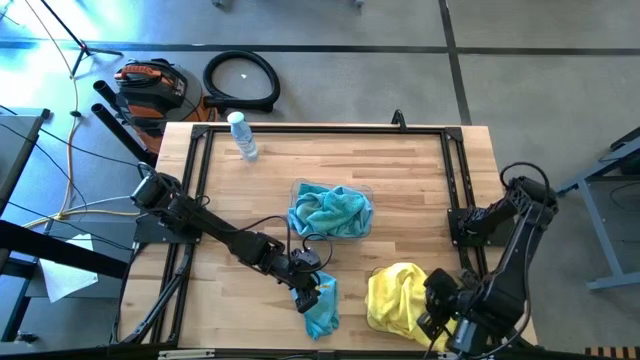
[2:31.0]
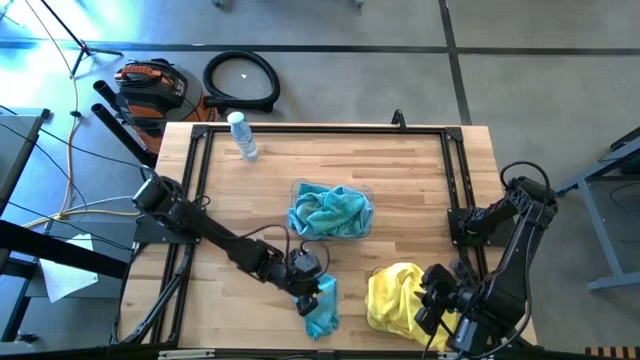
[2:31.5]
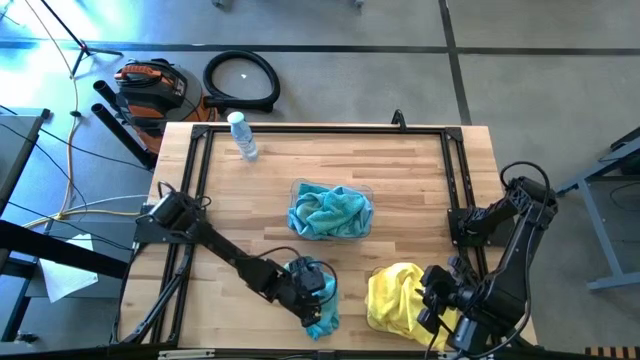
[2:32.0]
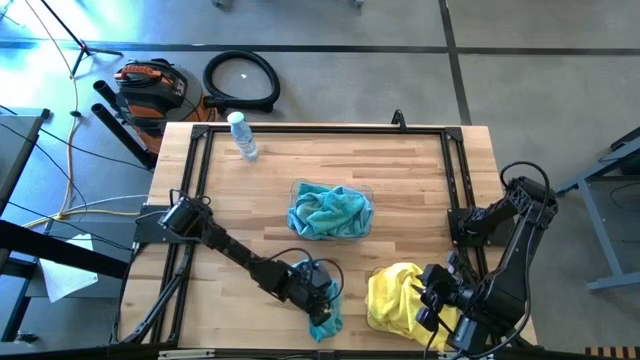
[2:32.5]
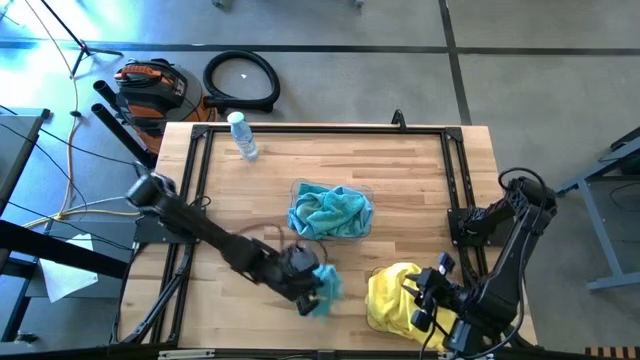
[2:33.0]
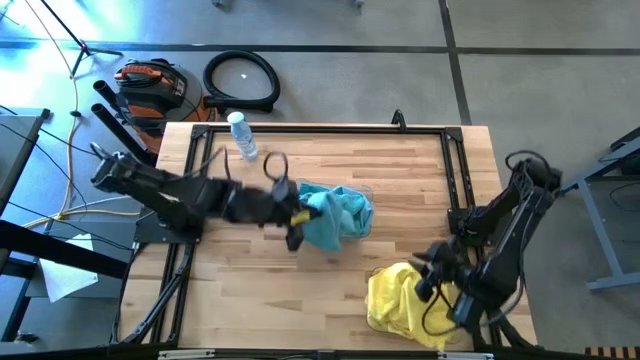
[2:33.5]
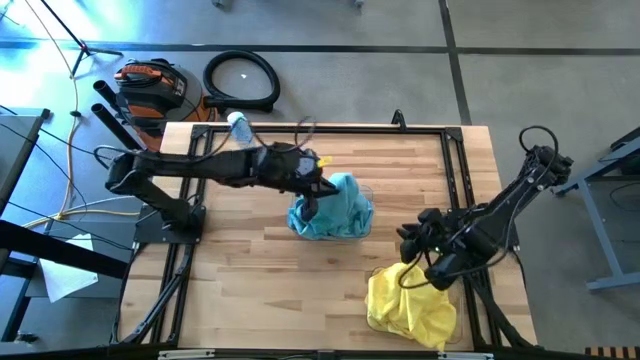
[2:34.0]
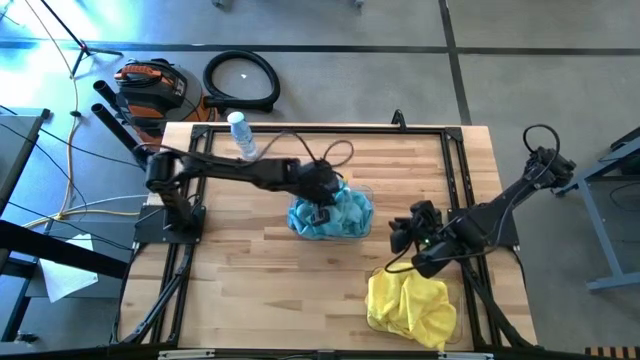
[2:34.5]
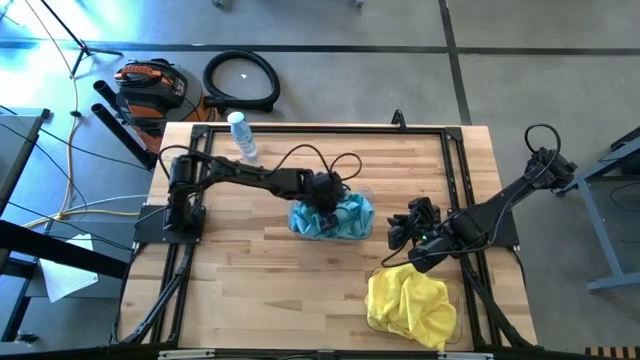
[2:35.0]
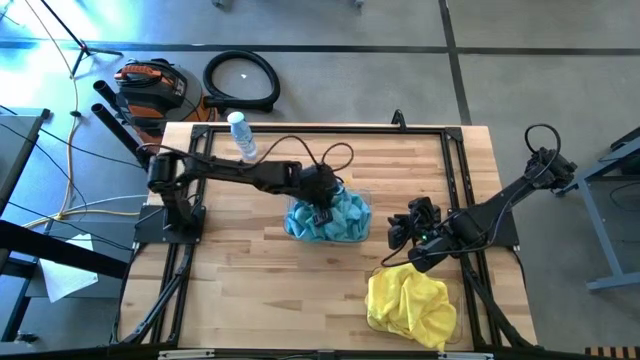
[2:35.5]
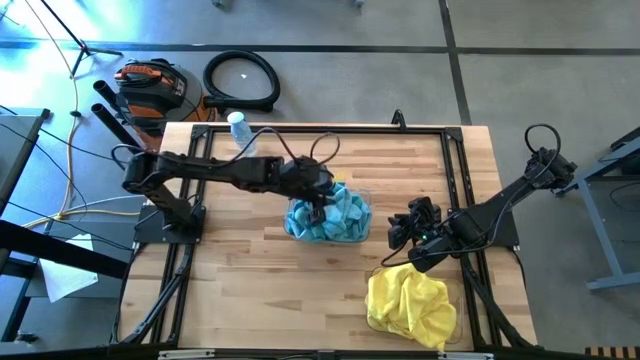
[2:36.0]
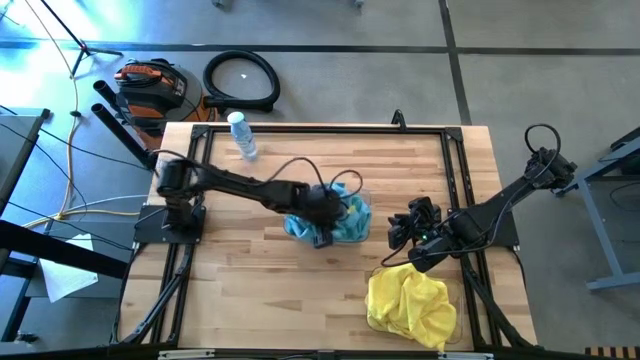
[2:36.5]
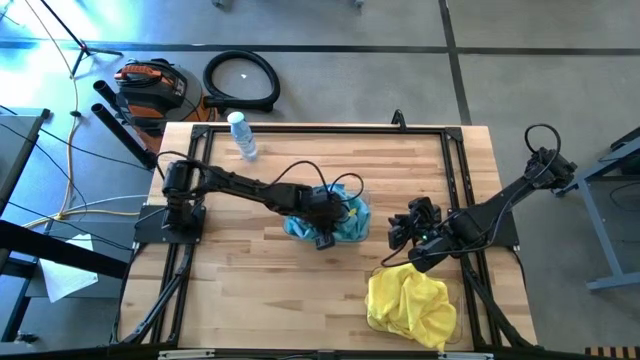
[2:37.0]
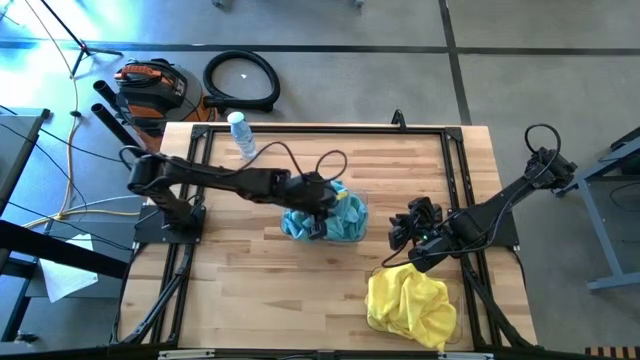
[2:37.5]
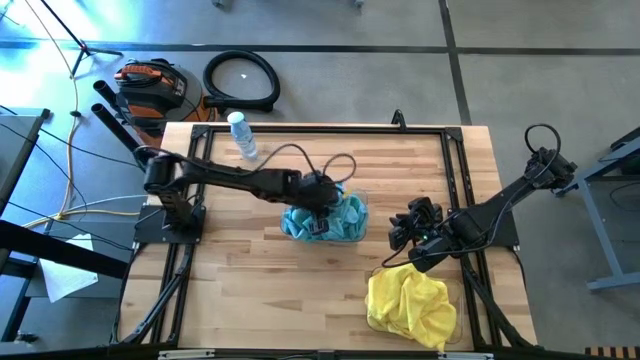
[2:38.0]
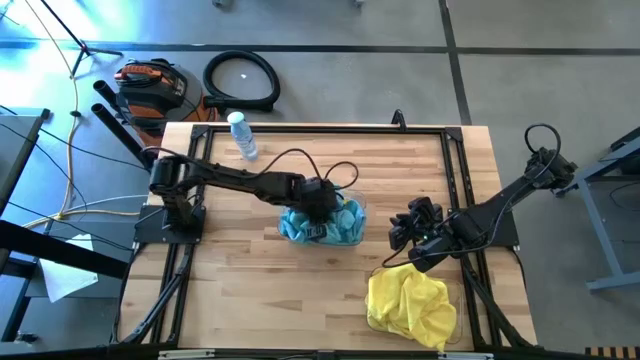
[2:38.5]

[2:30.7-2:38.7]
Task: Sort microfiber towel by color & place in baskets
Put the blue towel in the top transparent bin

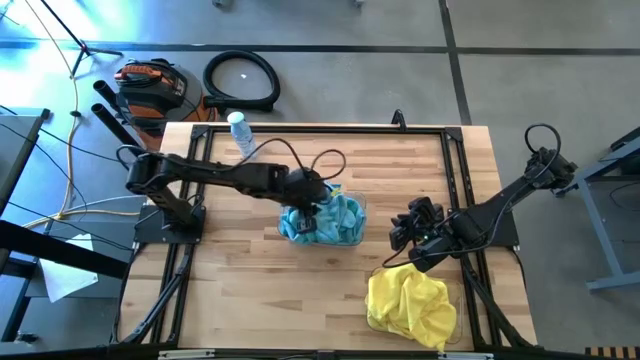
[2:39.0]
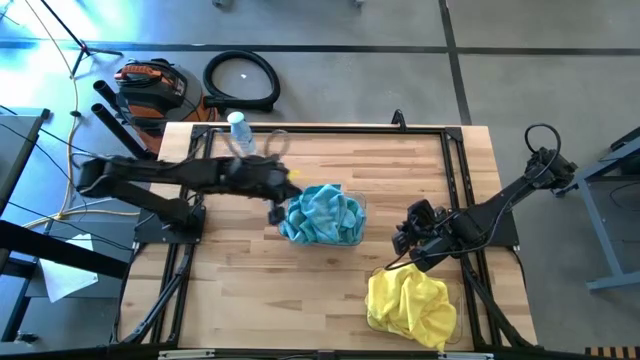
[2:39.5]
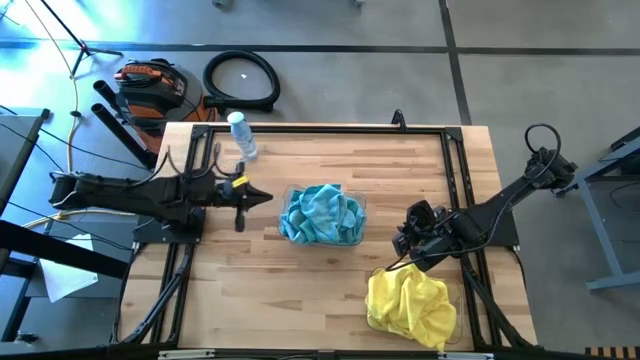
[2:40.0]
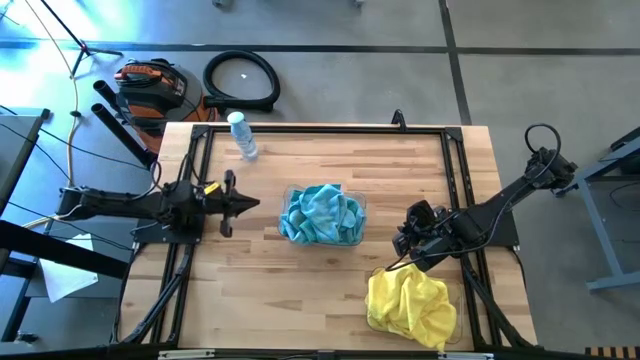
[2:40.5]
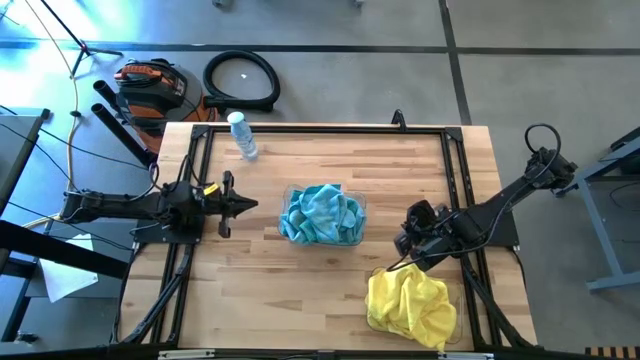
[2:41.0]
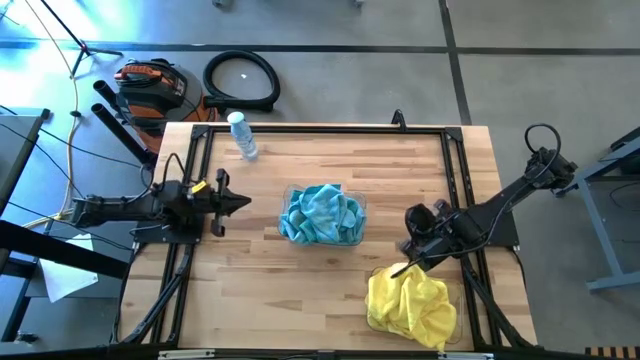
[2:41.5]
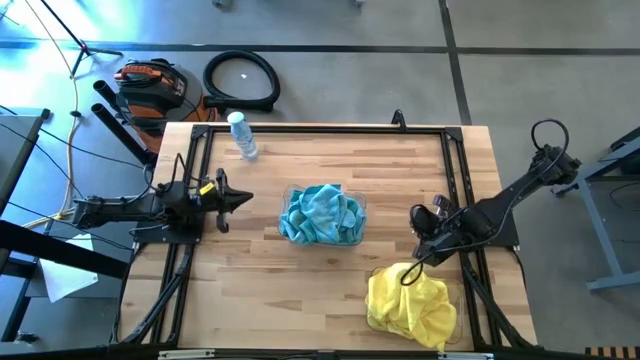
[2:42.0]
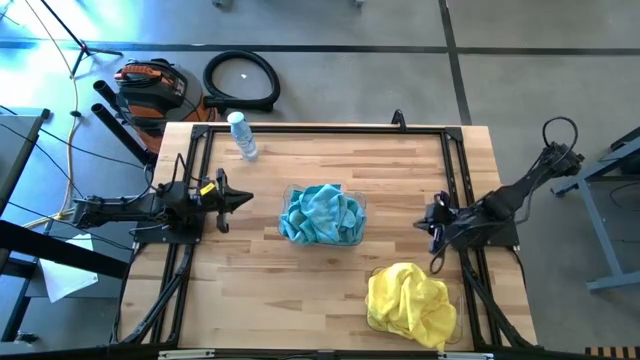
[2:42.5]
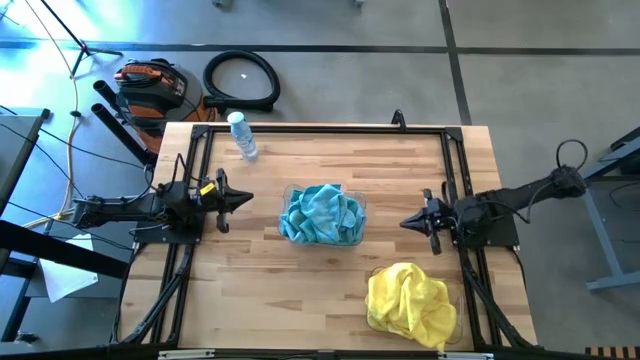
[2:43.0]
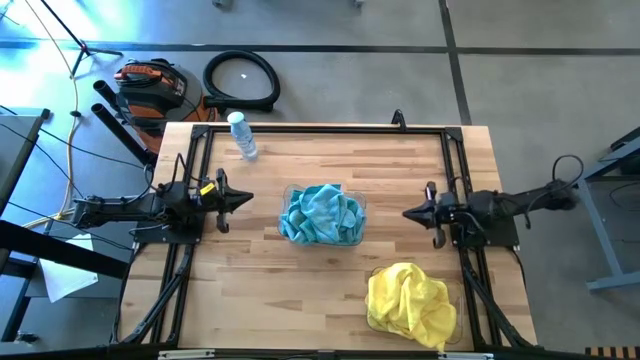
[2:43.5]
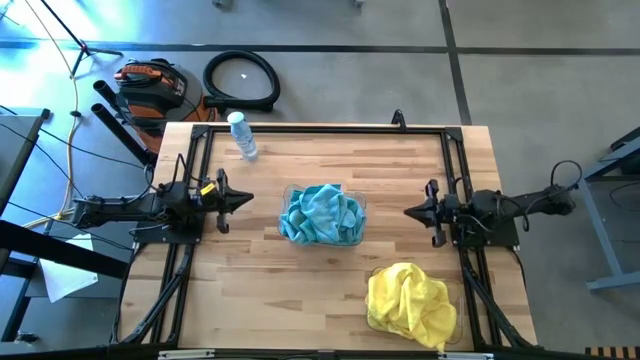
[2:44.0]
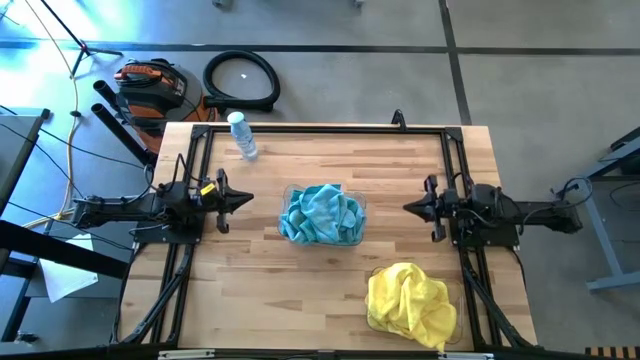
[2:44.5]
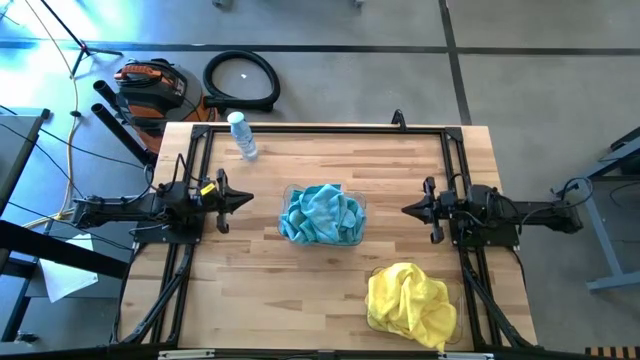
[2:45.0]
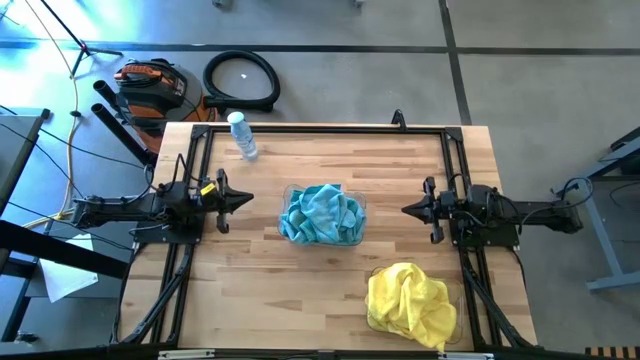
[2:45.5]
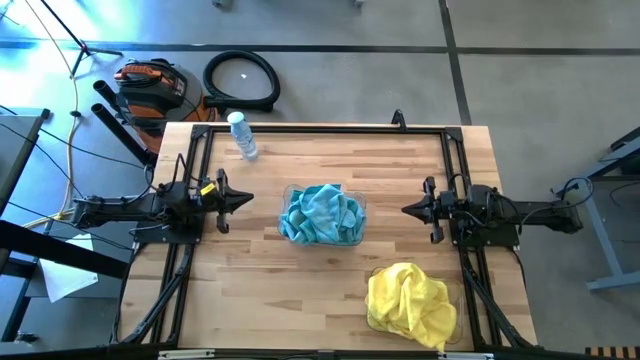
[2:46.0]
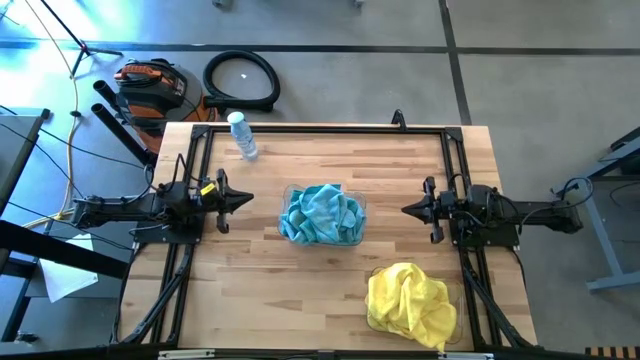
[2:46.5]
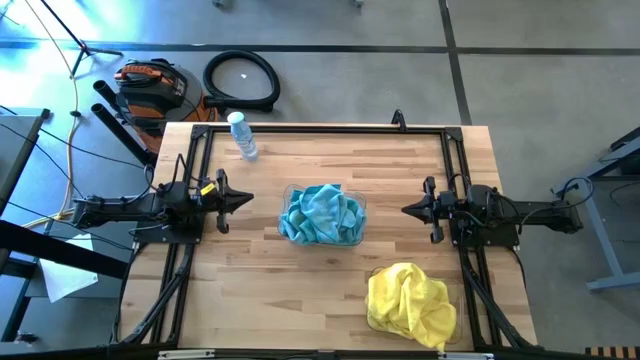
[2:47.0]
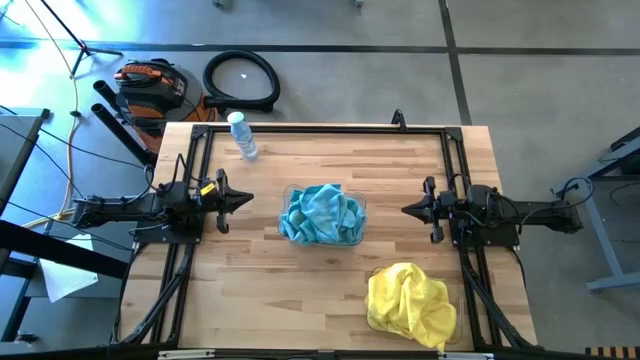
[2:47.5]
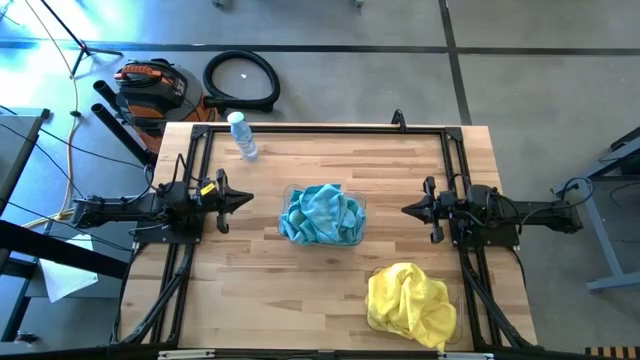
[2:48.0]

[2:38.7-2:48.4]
Return to Home Position

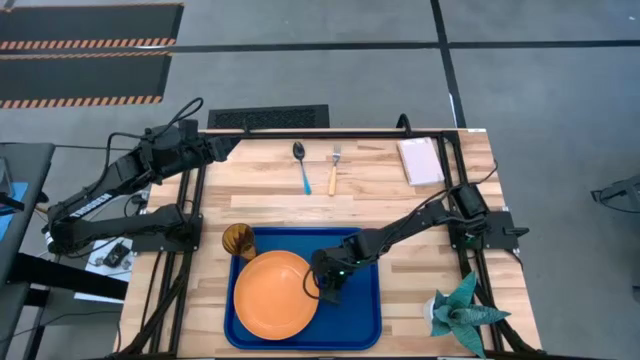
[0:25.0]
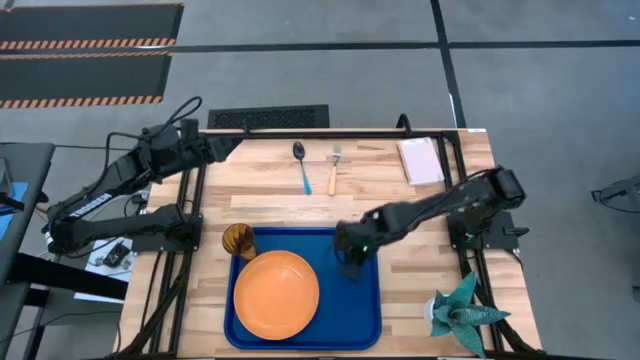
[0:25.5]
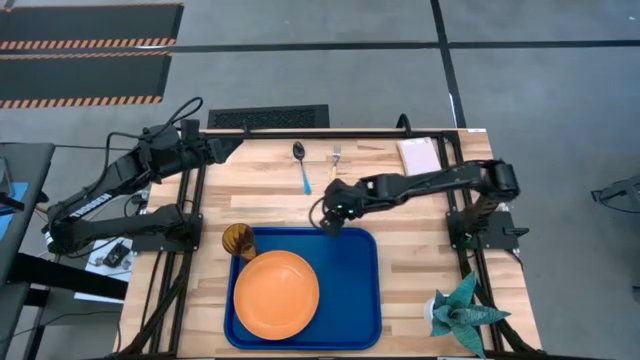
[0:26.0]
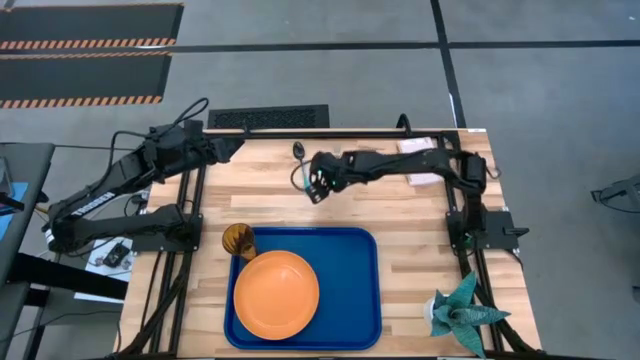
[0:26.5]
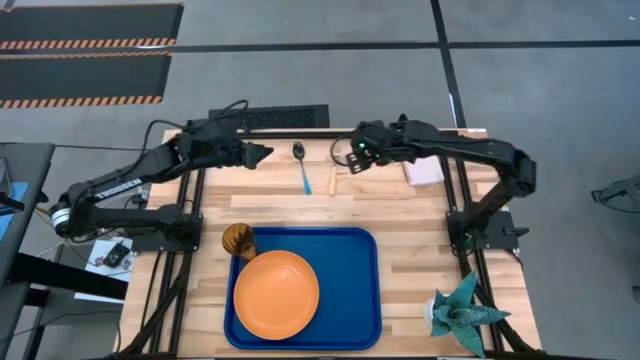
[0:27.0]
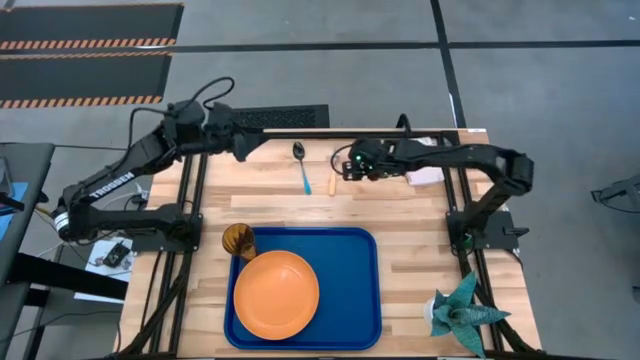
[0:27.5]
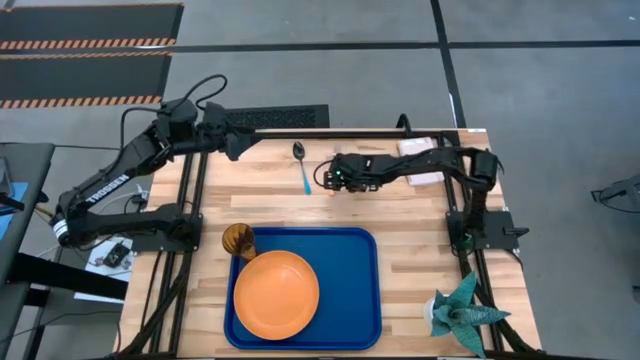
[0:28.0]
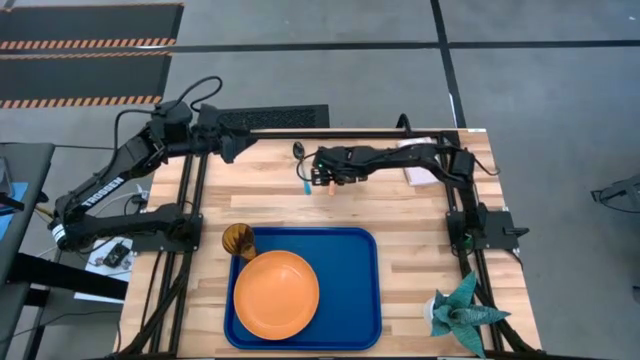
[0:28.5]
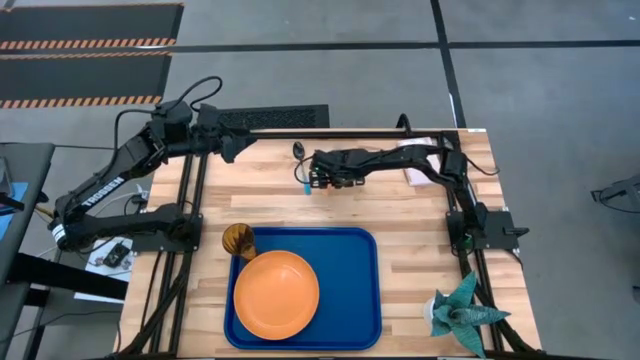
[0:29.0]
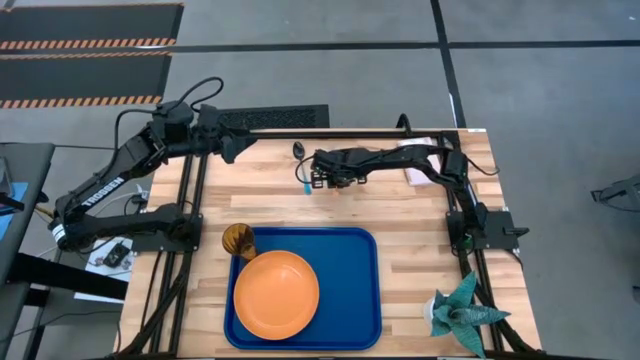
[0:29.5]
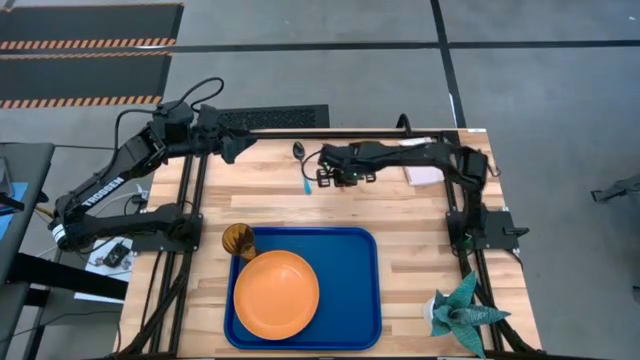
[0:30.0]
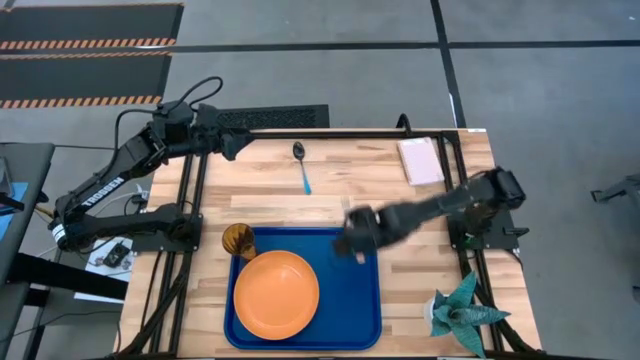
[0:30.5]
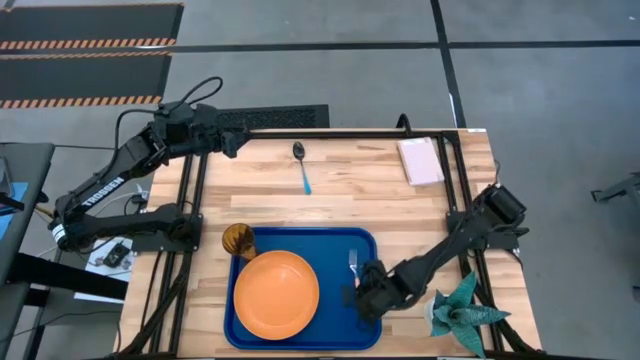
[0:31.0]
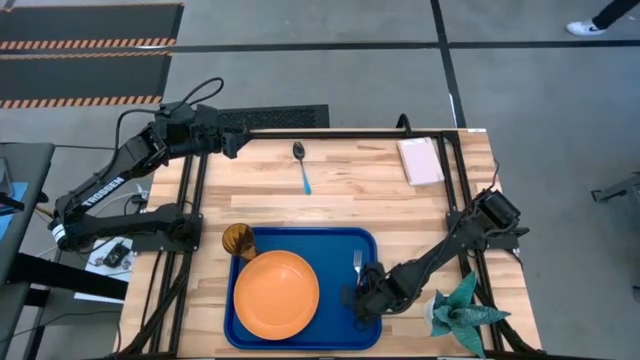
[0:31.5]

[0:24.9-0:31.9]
Task: Pick and place plate/cup/fork/spoon on tray
Put the orange fork on the blue tray to the right of the orange plate
